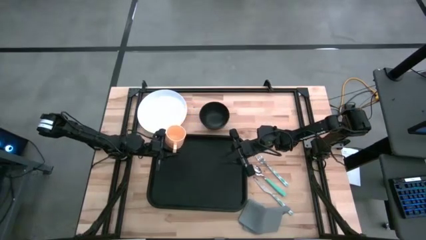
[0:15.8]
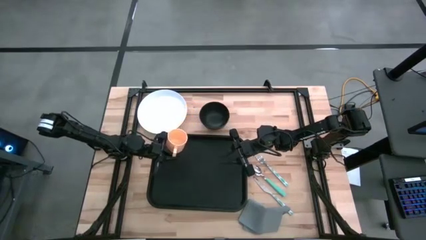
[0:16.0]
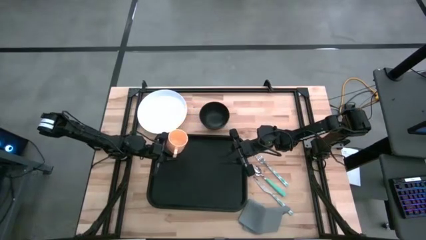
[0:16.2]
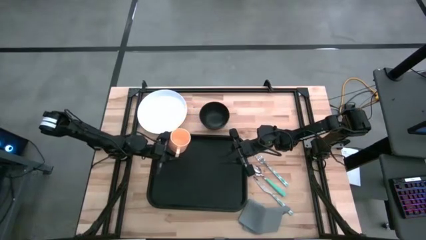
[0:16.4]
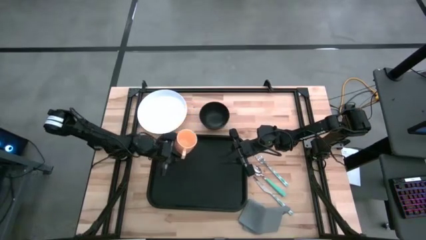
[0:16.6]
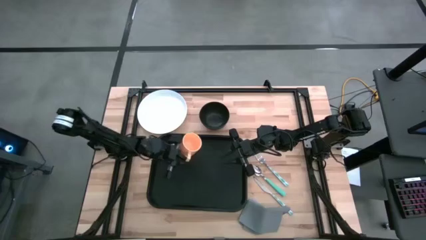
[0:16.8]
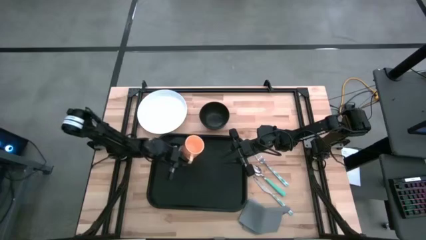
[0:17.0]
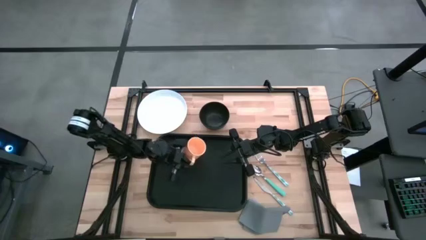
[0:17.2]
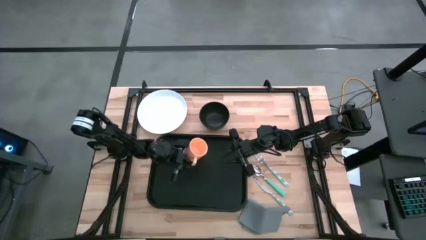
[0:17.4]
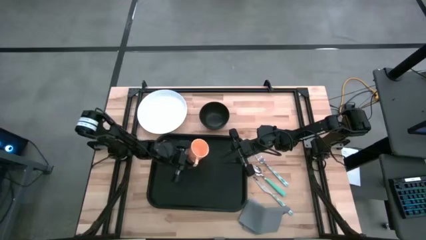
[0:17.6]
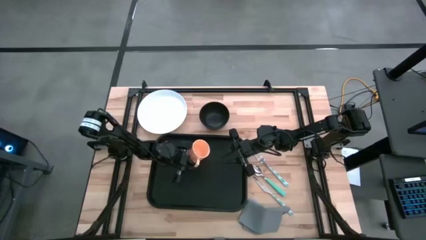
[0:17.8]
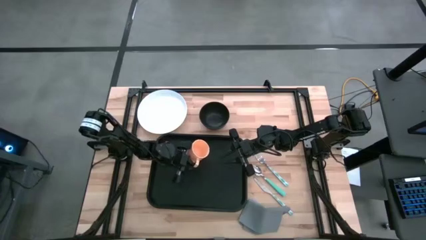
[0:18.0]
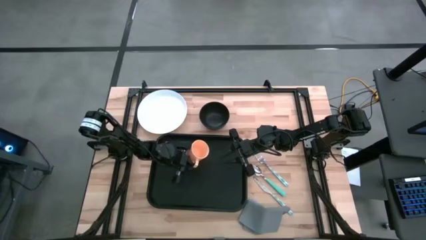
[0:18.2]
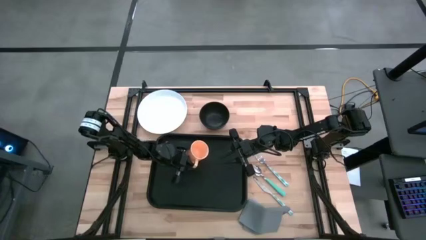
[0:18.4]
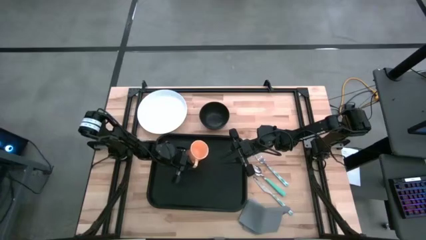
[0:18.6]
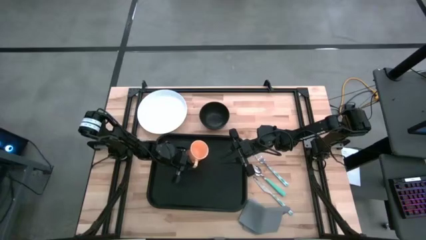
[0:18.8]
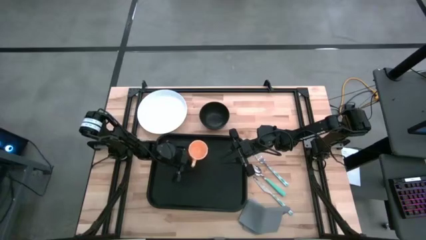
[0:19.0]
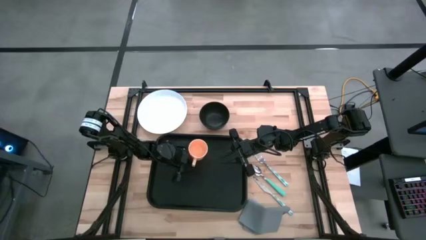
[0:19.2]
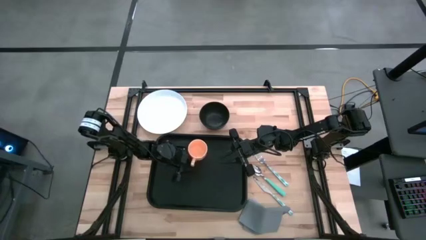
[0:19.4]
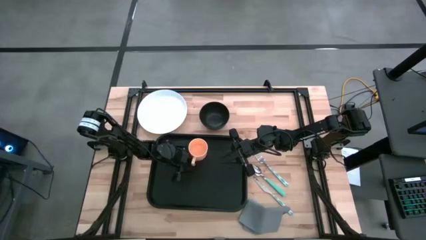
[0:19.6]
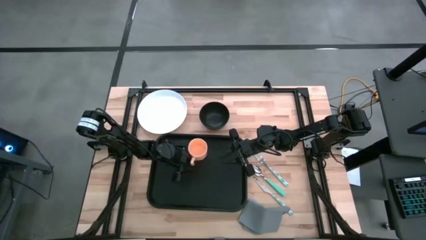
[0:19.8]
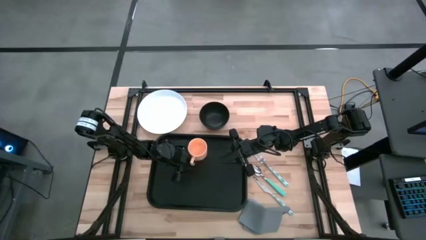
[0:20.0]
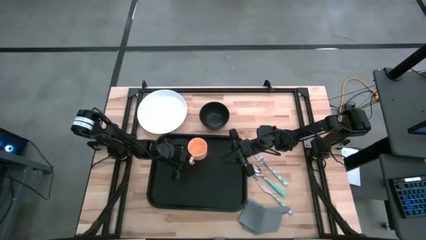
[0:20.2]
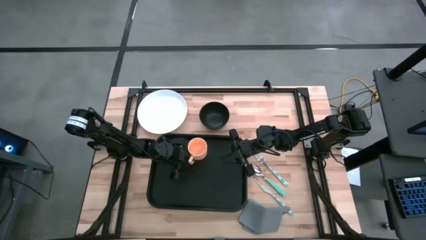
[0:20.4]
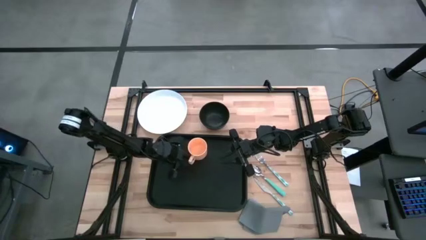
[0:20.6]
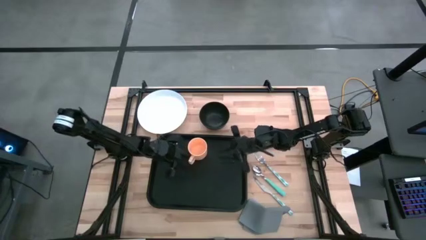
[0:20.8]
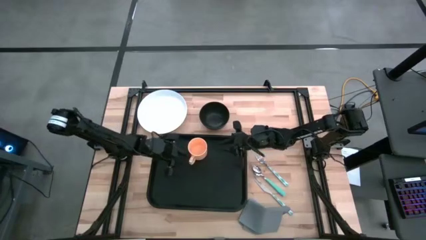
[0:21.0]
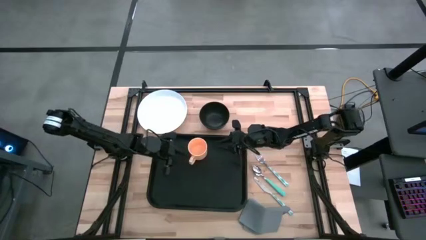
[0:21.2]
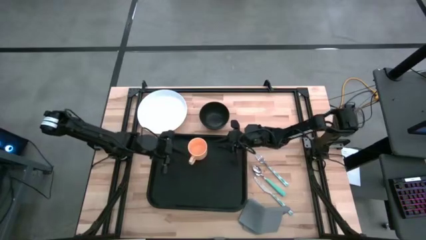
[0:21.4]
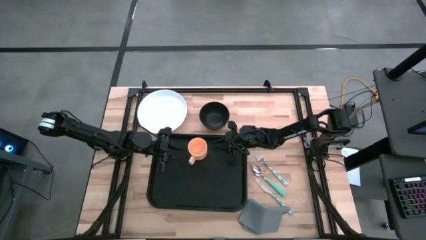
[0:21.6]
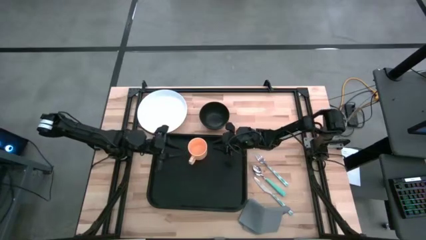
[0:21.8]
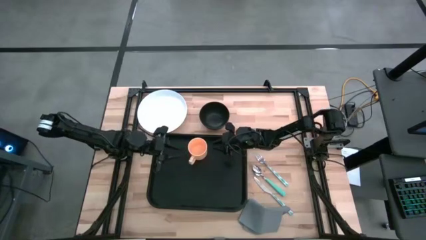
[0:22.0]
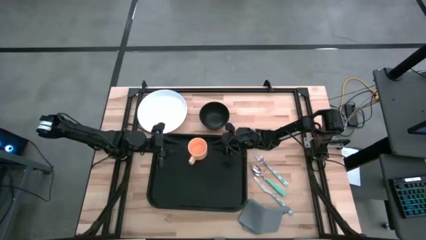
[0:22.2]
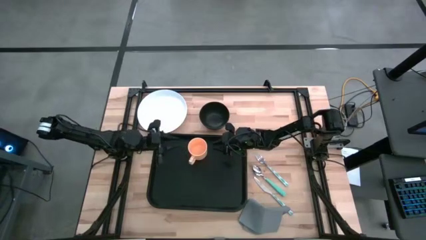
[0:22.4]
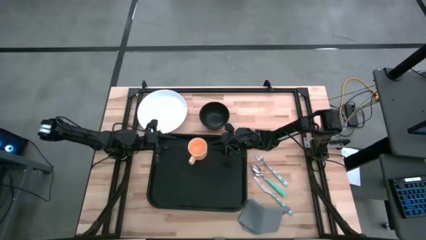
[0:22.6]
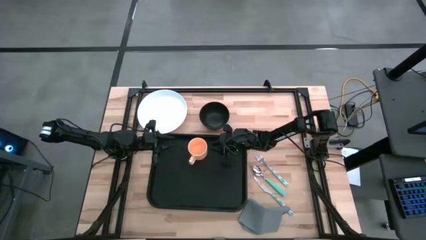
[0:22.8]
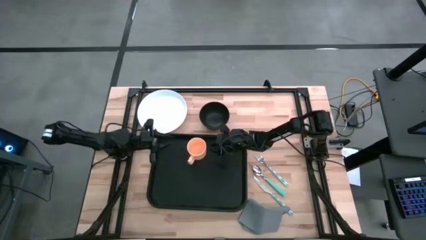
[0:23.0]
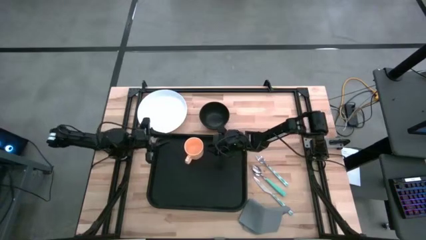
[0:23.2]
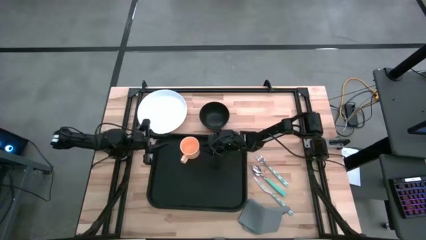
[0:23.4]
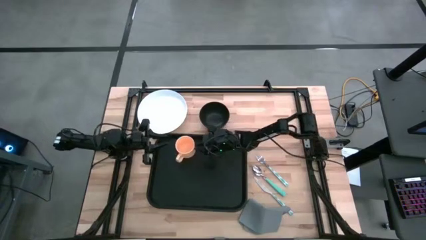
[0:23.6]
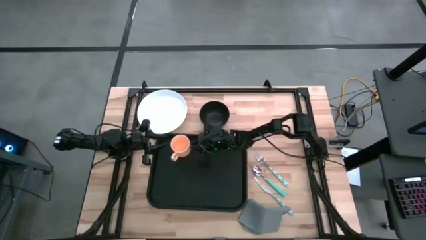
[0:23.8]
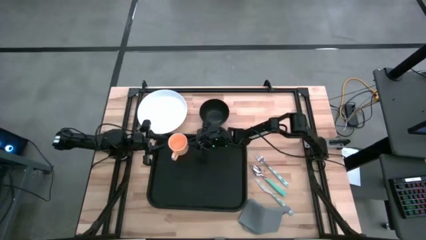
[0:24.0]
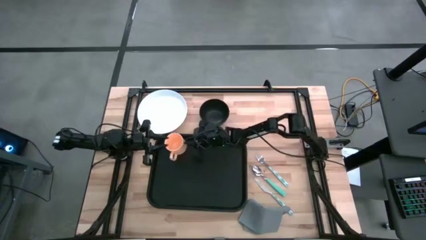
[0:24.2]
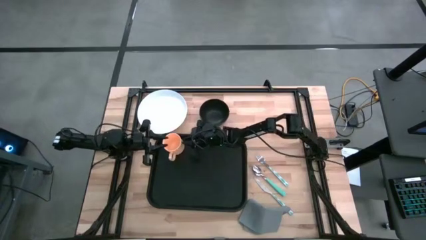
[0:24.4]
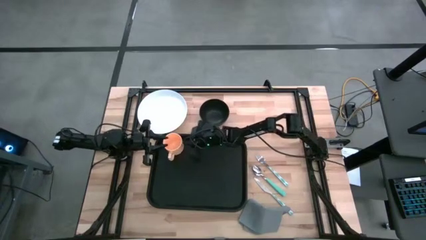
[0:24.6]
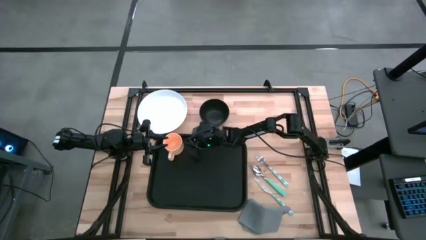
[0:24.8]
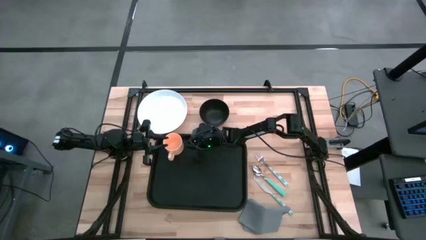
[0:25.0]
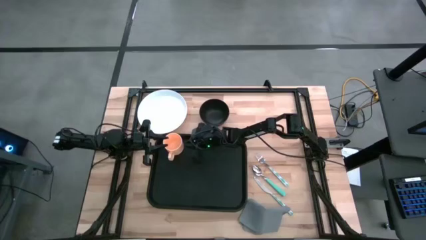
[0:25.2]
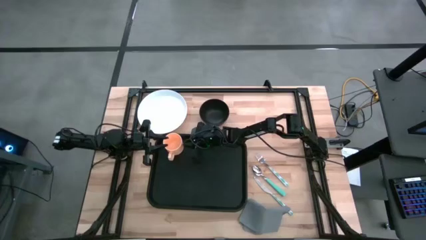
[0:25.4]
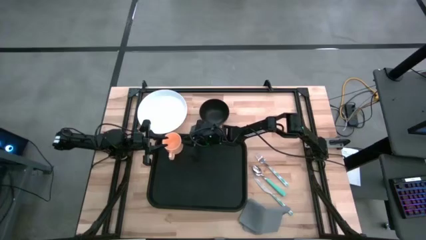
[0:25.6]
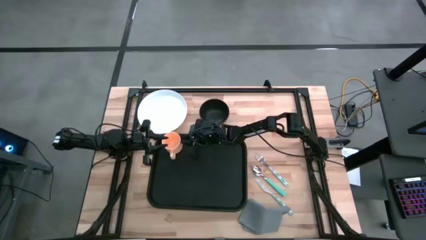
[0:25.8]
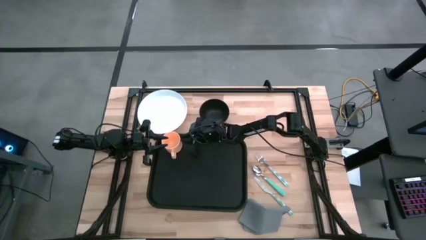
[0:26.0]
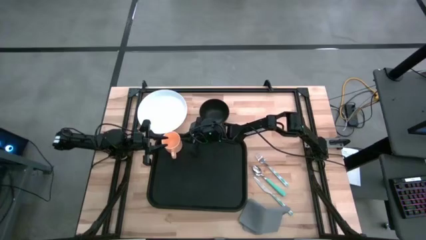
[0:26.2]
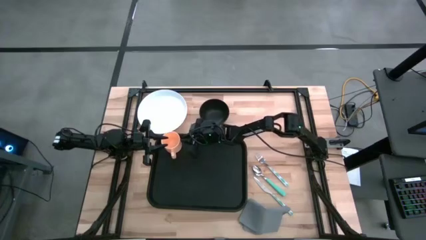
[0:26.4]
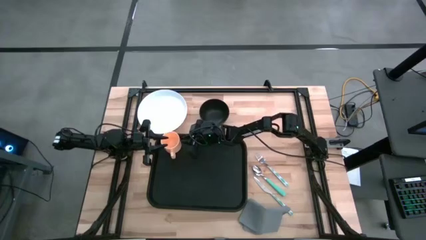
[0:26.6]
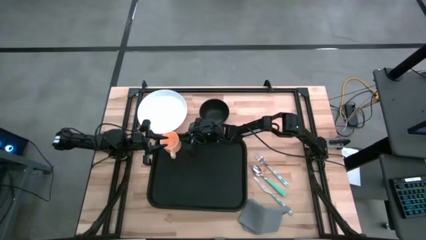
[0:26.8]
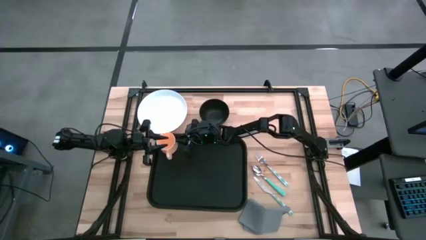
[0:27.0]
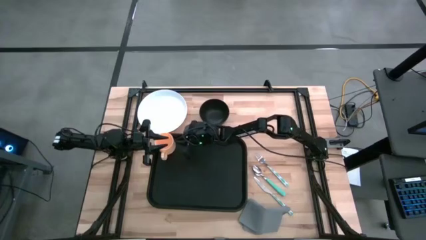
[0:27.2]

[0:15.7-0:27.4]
Task: Set up tray
Put the yellow mug on the black serving tray
